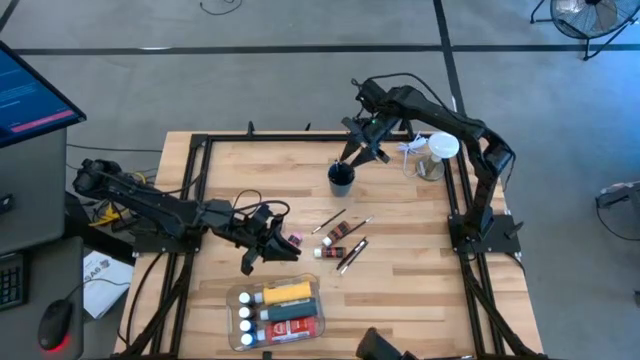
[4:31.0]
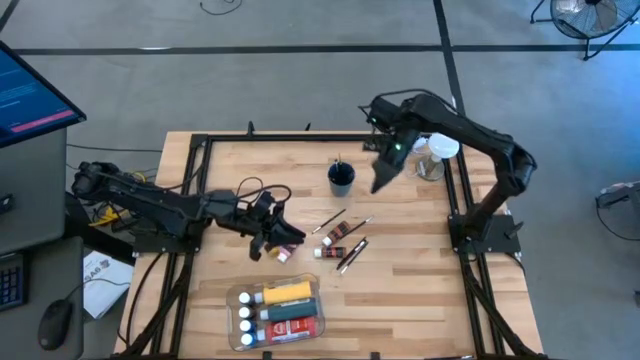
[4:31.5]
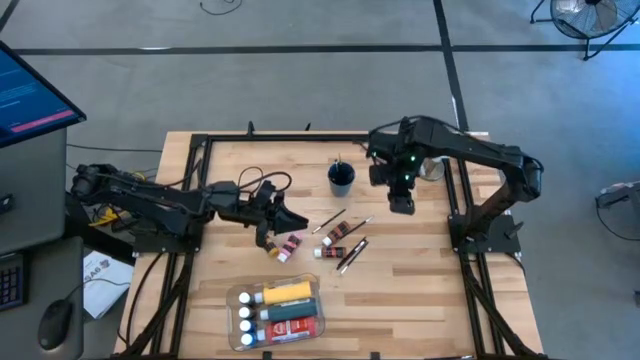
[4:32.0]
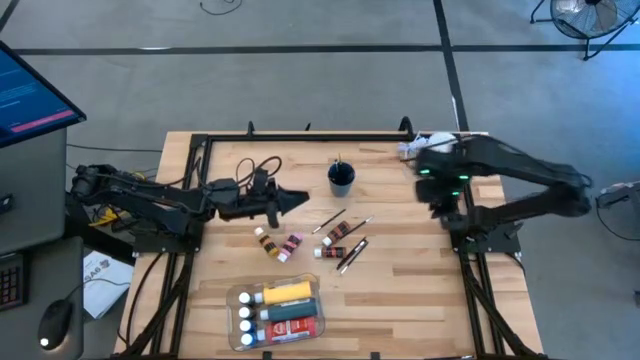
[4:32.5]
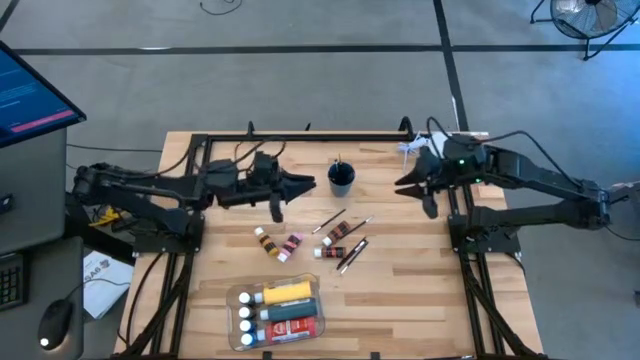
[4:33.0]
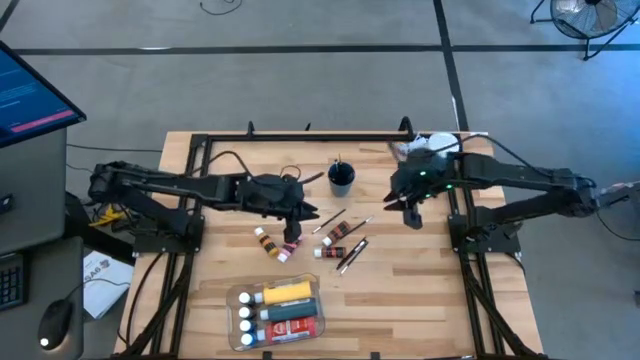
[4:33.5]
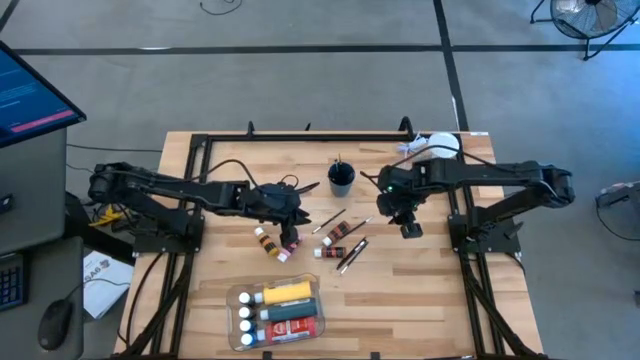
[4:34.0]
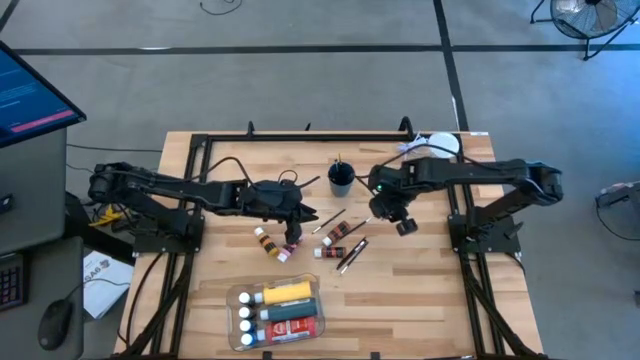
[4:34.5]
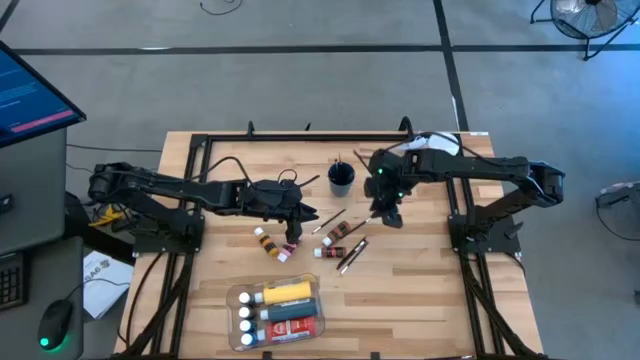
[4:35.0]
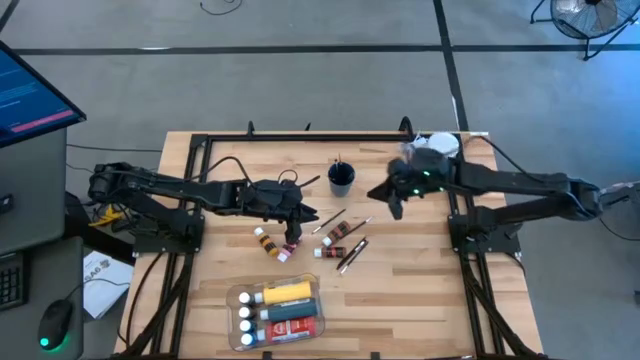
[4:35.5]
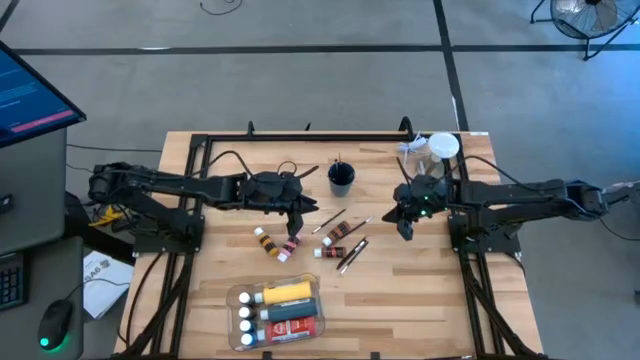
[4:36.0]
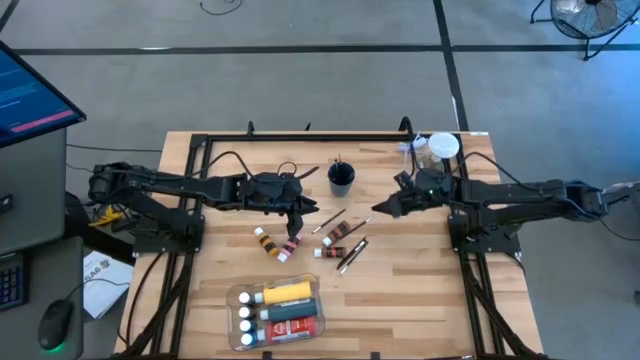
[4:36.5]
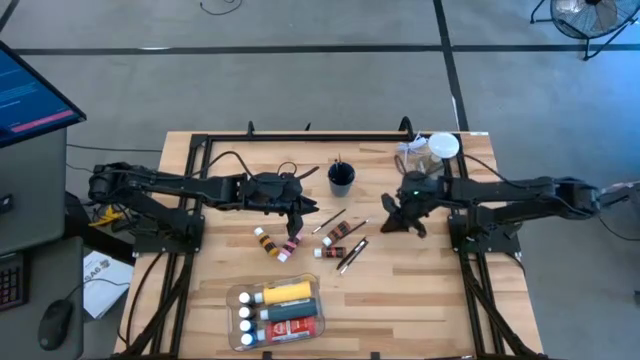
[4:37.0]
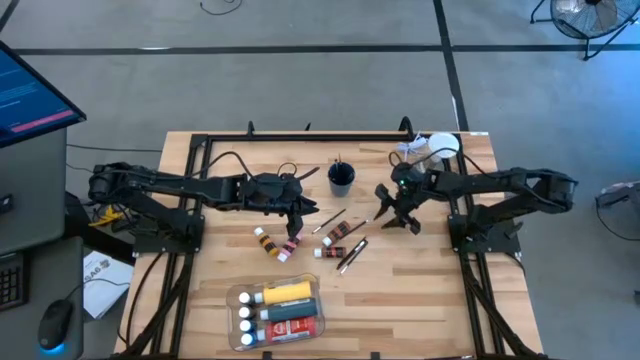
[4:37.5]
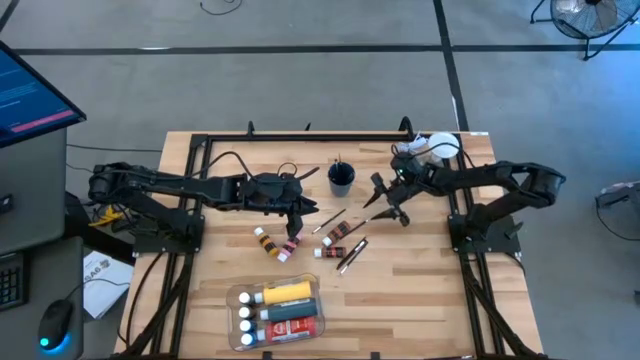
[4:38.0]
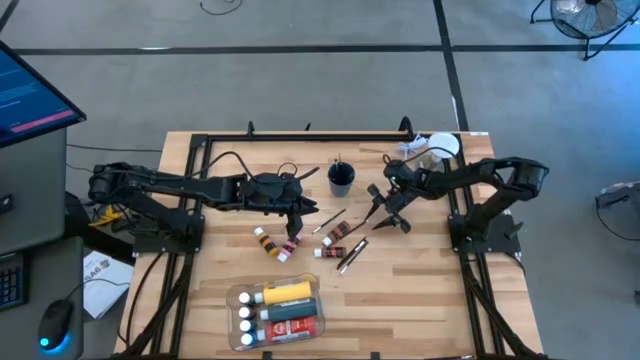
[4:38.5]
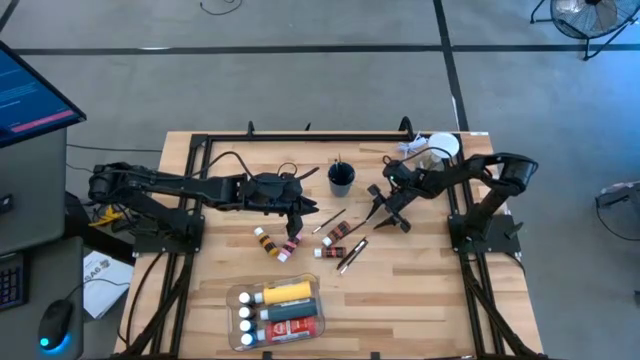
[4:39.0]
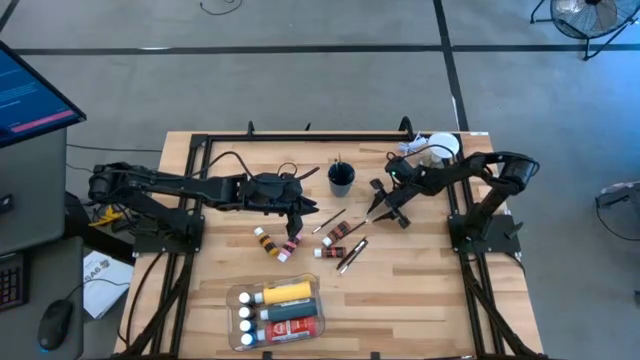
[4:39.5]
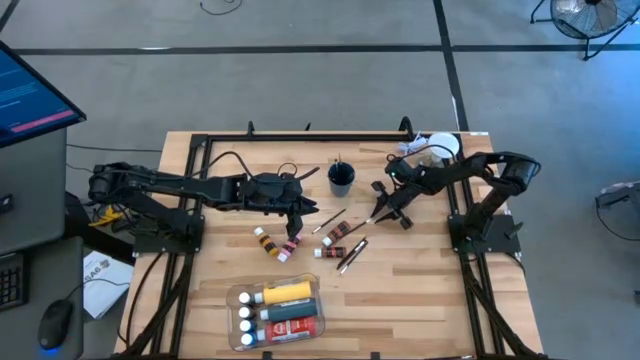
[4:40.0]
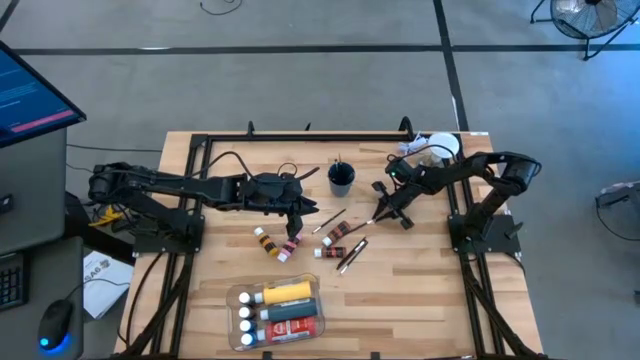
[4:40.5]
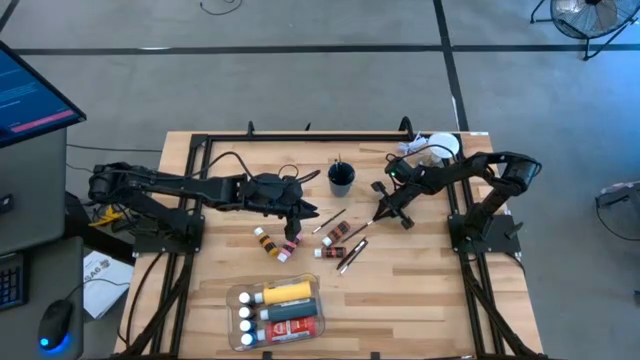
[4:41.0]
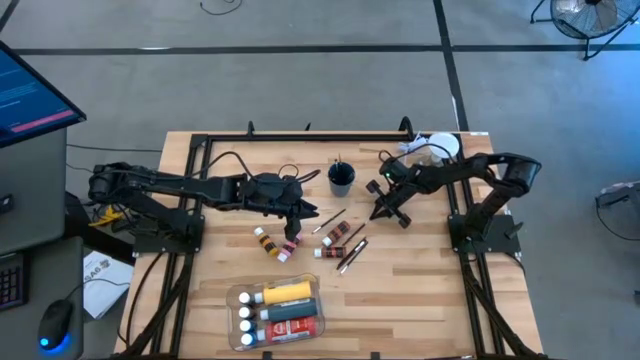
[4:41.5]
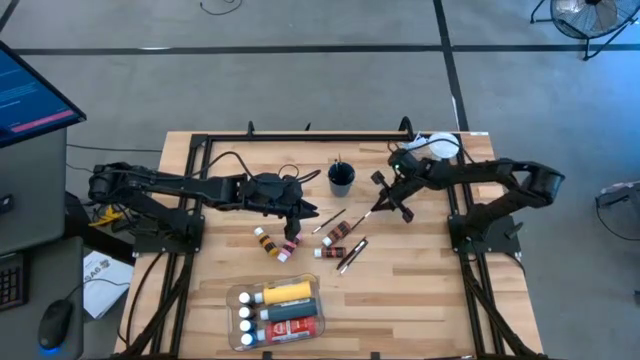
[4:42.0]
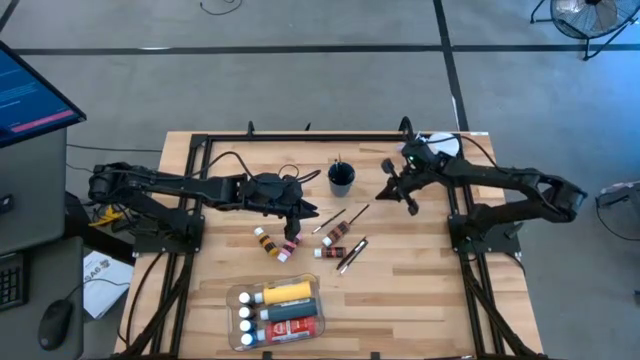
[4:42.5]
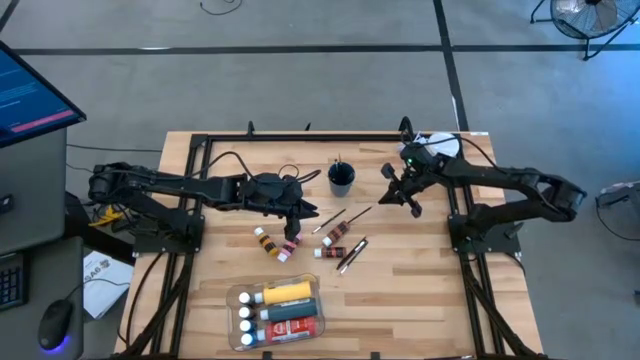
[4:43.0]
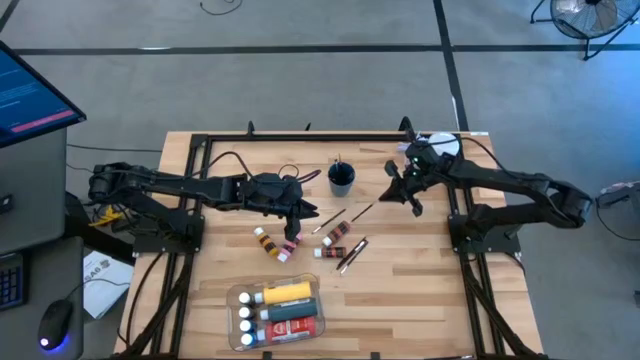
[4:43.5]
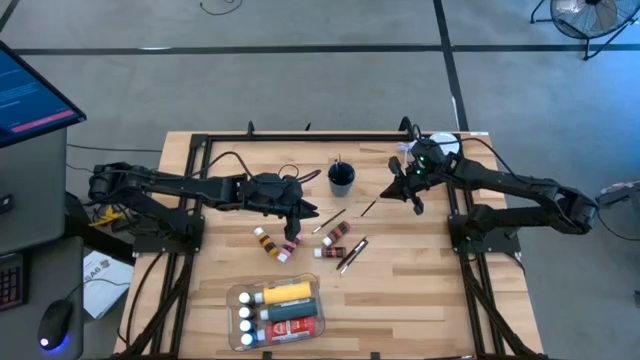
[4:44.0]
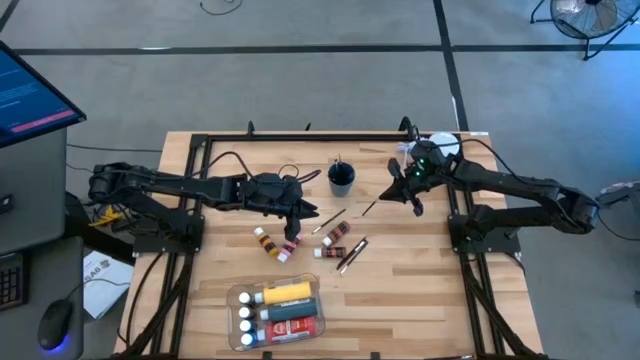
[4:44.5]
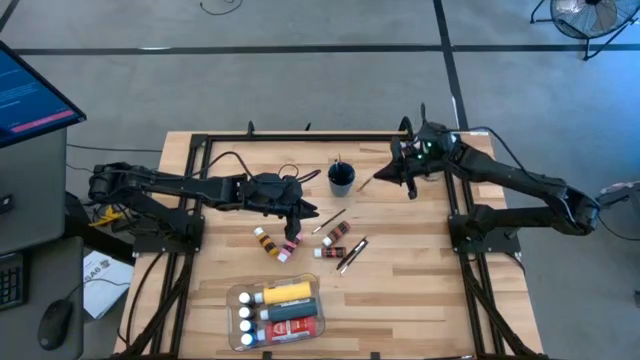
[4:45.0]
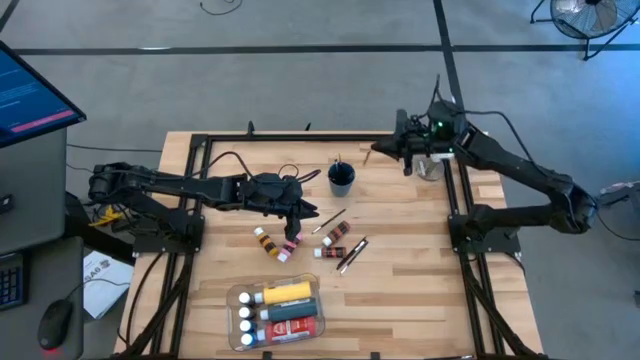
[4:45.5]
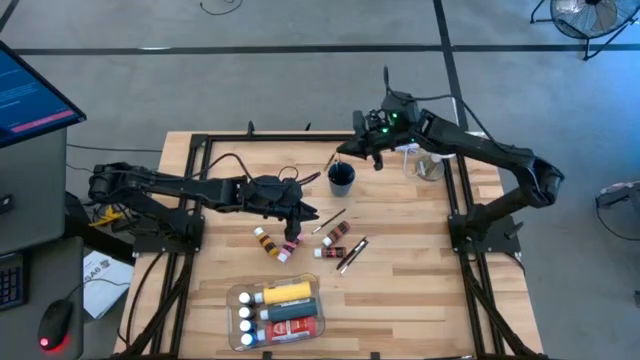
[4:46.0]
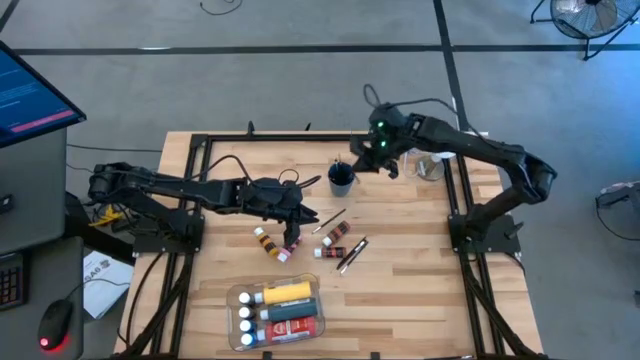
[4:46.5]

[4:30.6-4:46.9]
Task: Pick & Place Paint Supplies
Put the paint brush into the blue cup

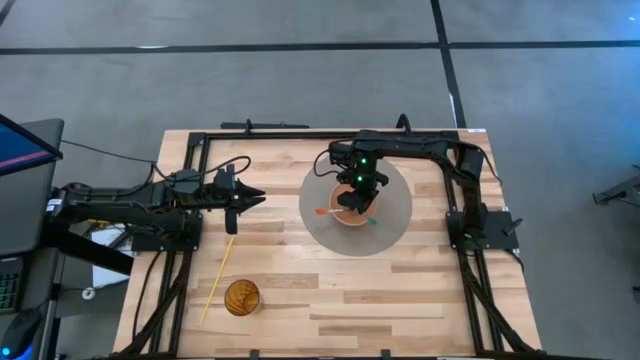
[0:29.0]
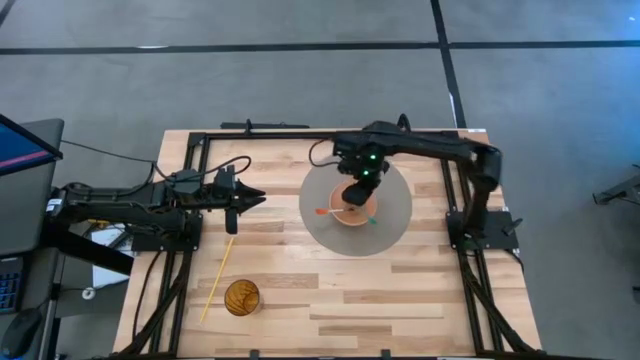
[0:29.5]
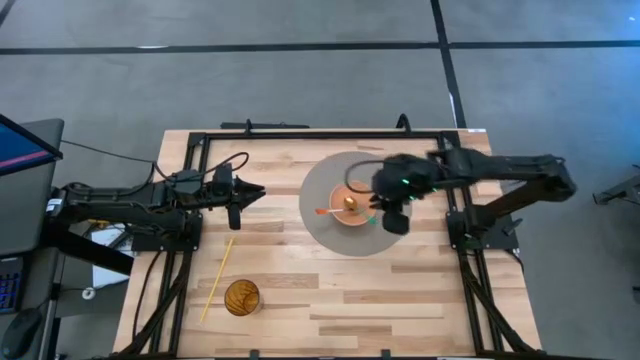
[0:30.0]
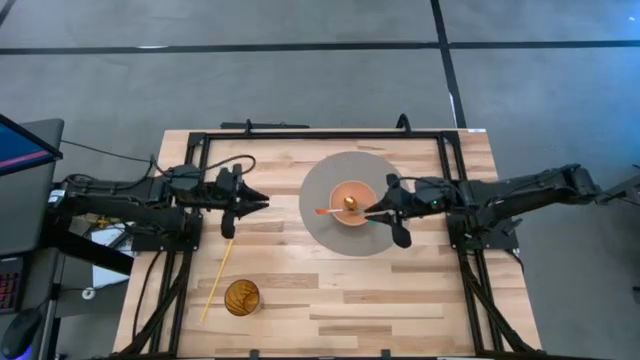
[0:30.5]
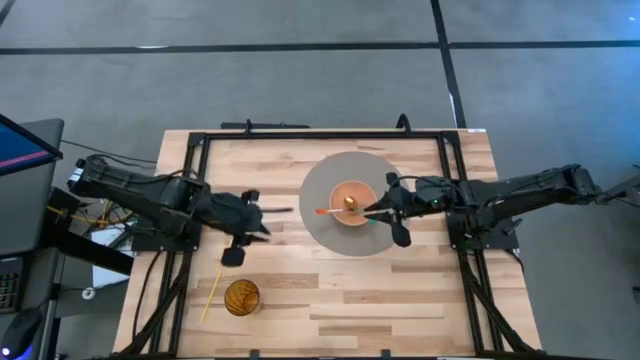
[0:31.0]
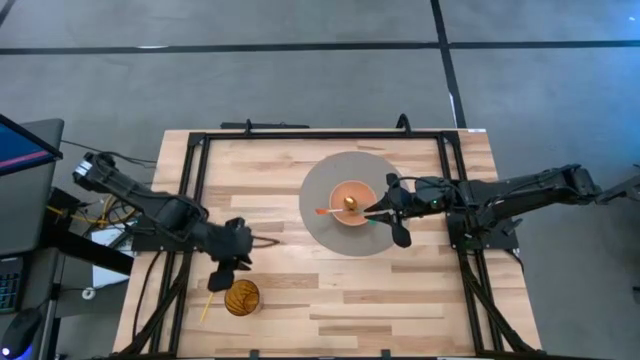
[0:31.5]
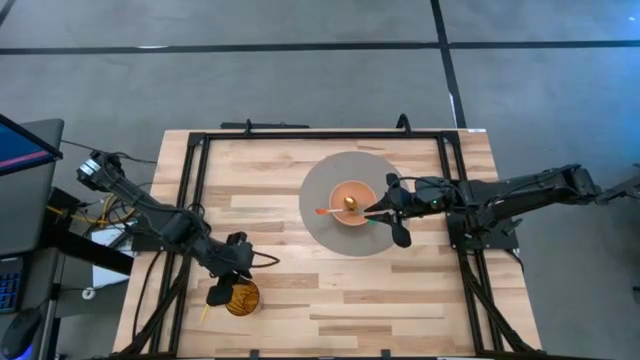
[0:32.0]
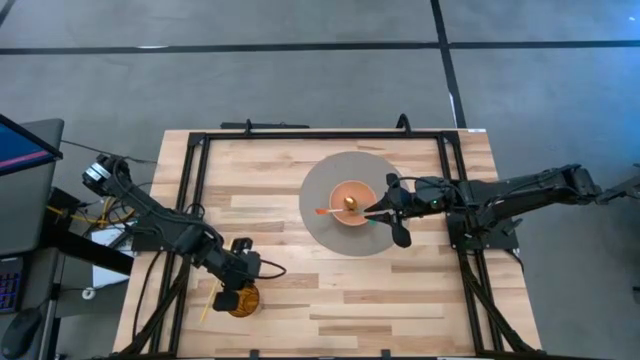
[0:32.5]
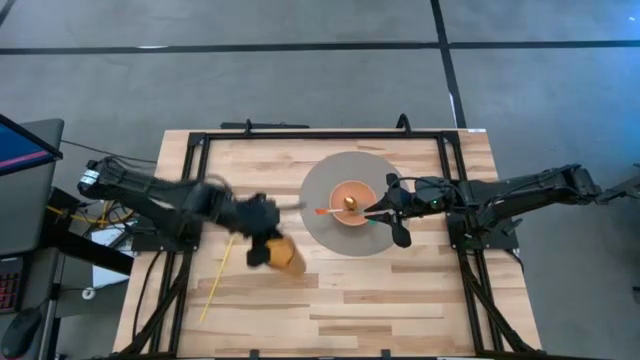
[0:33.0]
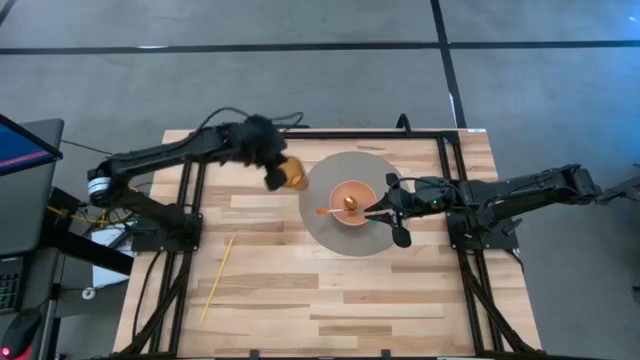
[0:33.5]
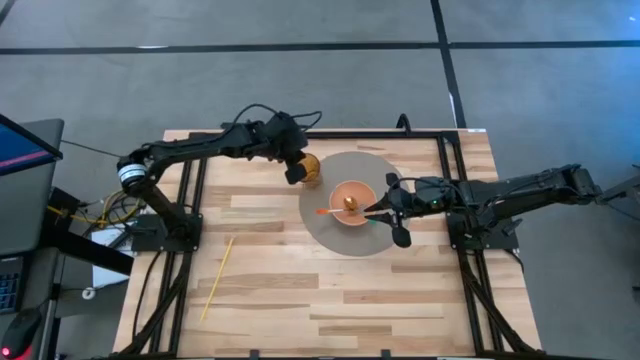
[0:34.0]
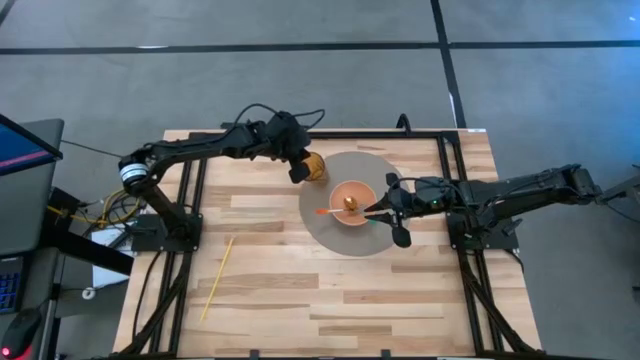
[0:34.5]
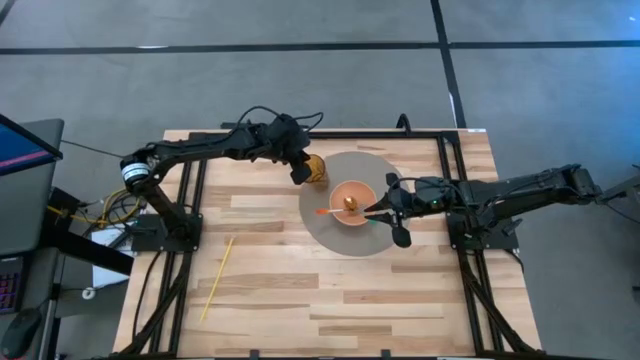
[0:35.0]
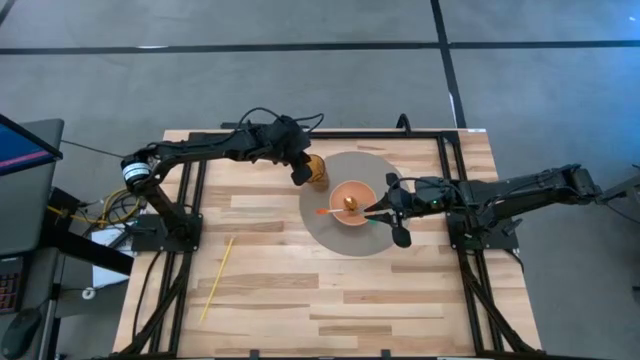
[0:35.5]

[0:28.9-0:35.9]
Task: Pick & Place Utensil
Put the brown cup on the gray mat to the top left of the orange bowl
